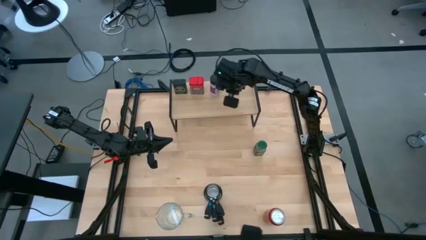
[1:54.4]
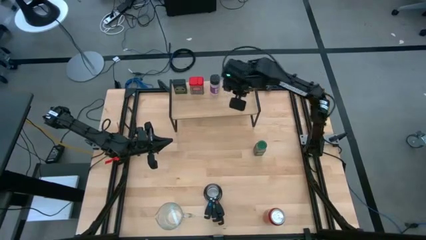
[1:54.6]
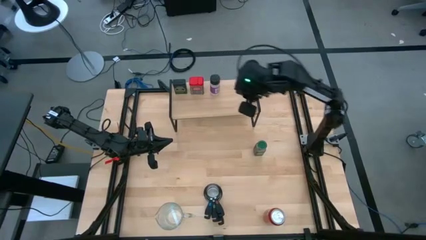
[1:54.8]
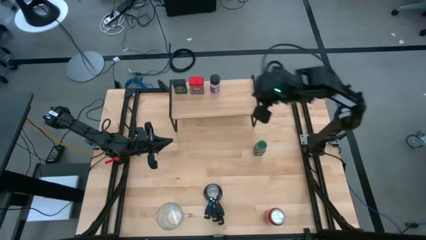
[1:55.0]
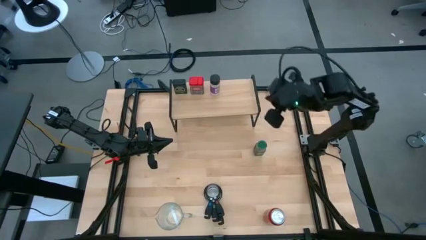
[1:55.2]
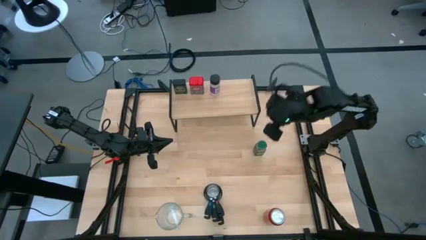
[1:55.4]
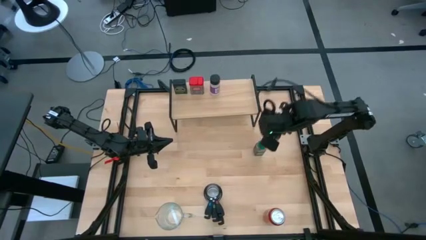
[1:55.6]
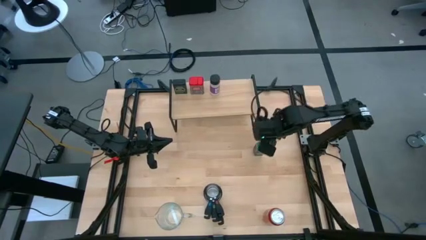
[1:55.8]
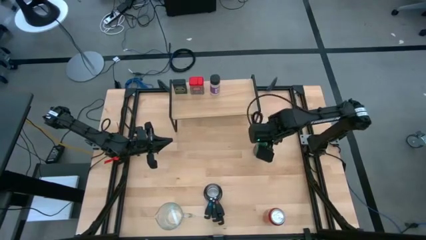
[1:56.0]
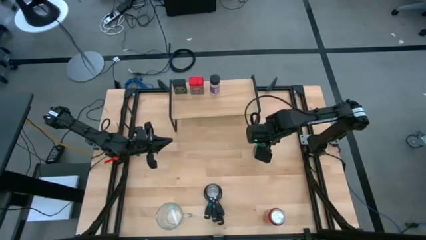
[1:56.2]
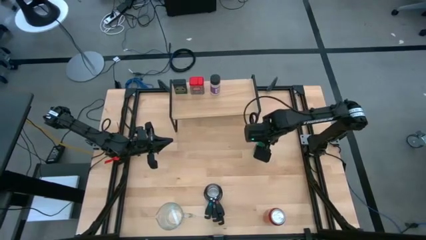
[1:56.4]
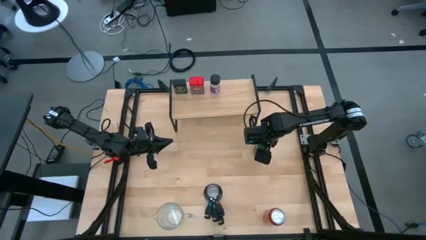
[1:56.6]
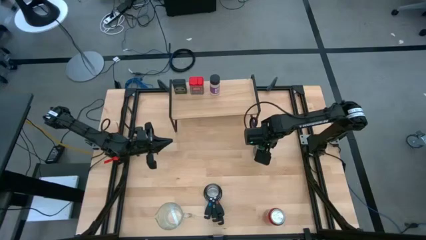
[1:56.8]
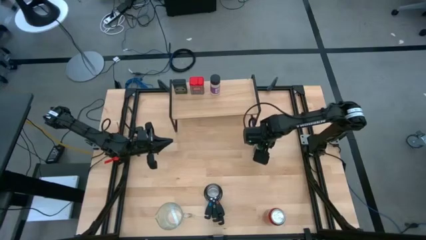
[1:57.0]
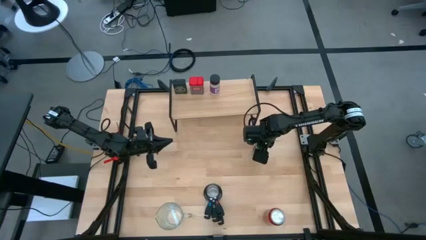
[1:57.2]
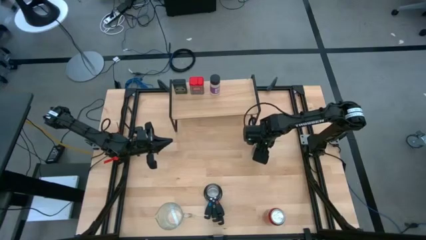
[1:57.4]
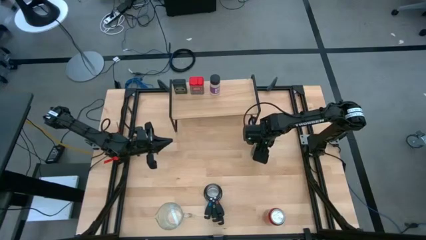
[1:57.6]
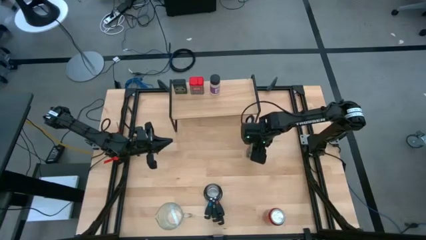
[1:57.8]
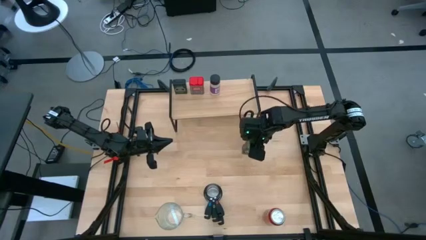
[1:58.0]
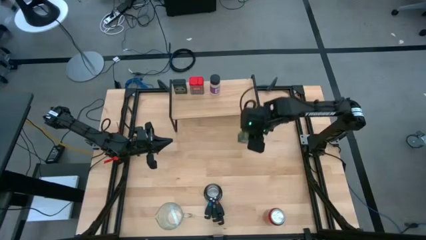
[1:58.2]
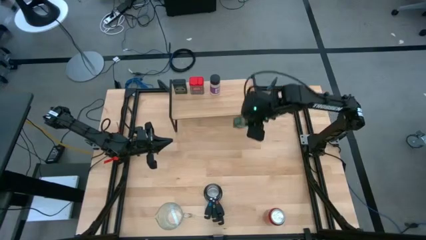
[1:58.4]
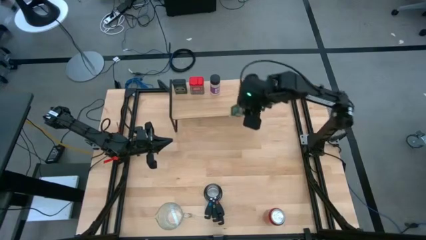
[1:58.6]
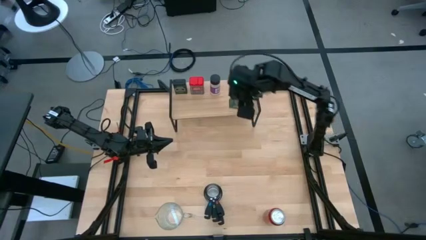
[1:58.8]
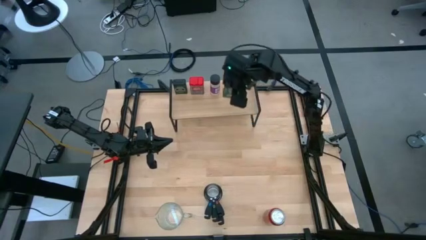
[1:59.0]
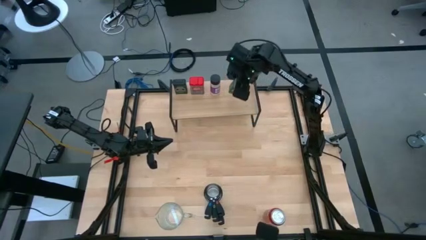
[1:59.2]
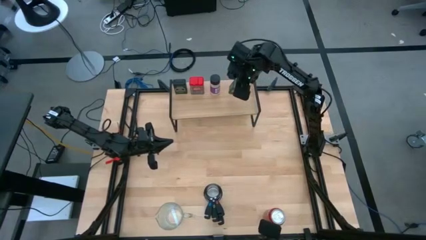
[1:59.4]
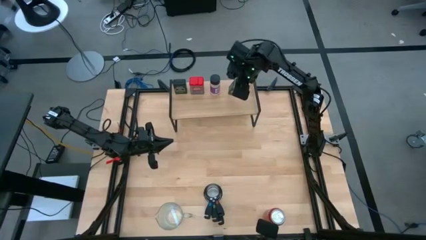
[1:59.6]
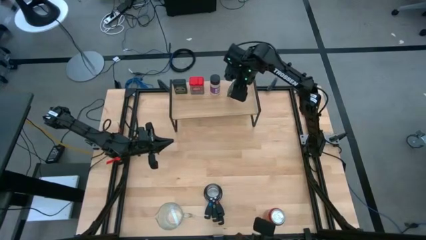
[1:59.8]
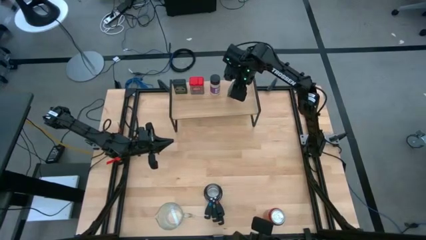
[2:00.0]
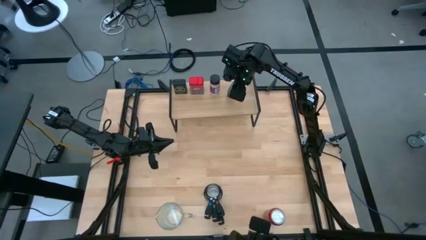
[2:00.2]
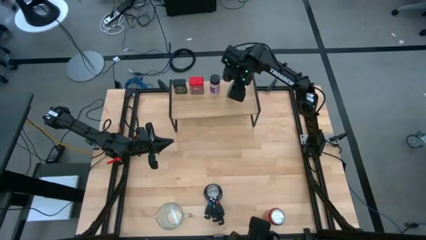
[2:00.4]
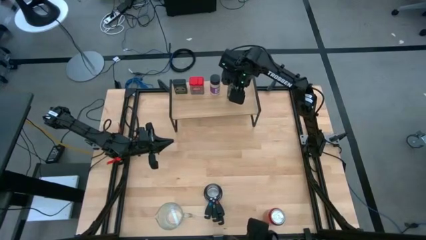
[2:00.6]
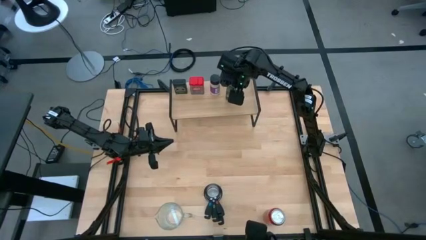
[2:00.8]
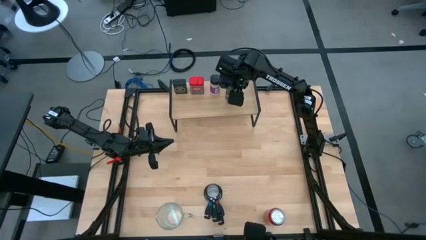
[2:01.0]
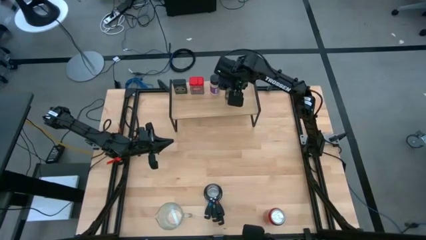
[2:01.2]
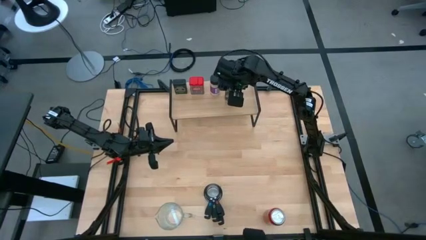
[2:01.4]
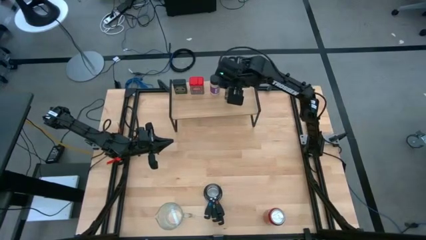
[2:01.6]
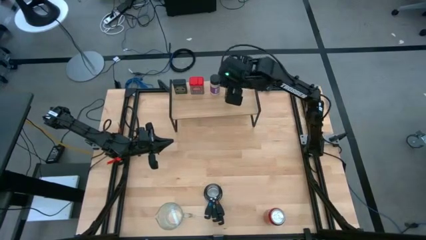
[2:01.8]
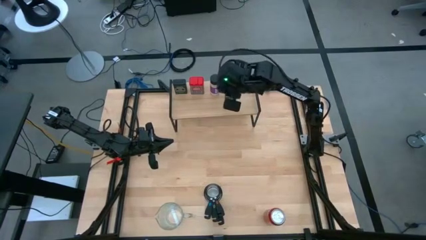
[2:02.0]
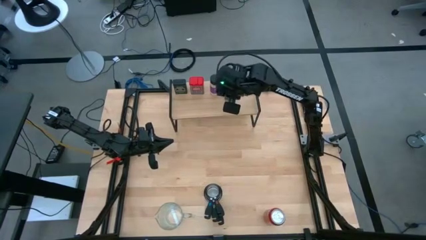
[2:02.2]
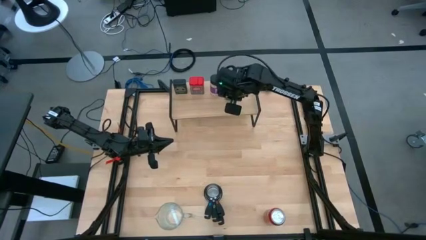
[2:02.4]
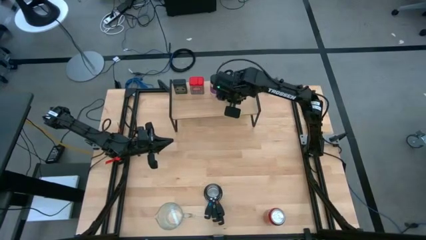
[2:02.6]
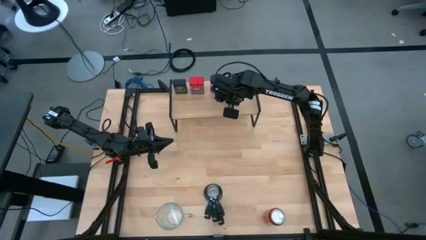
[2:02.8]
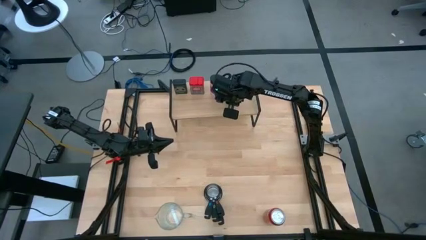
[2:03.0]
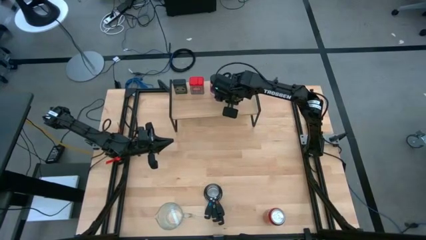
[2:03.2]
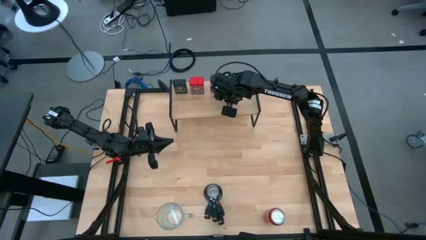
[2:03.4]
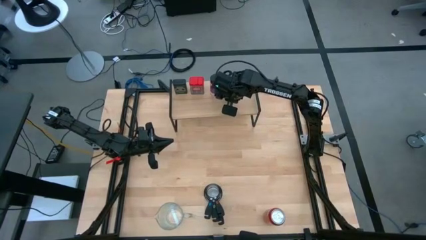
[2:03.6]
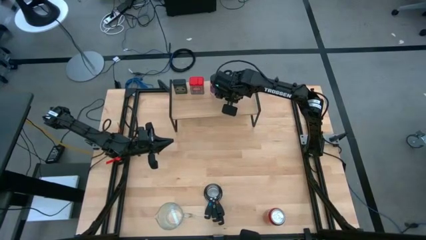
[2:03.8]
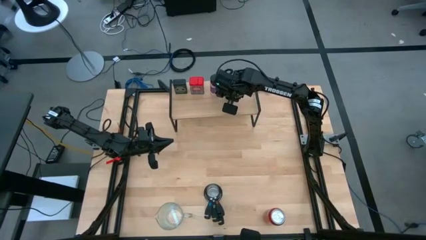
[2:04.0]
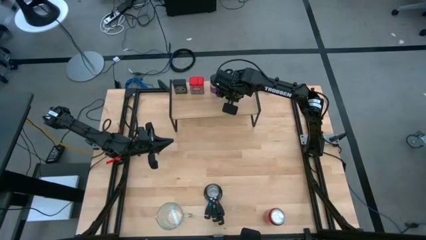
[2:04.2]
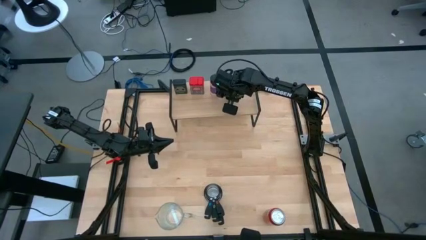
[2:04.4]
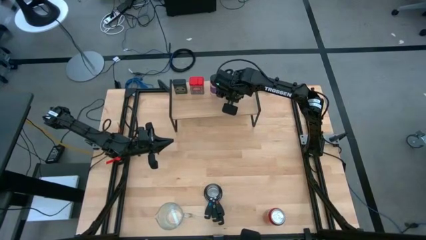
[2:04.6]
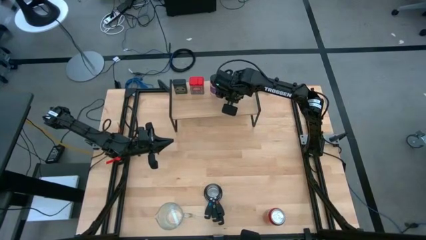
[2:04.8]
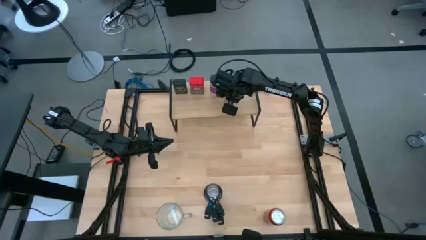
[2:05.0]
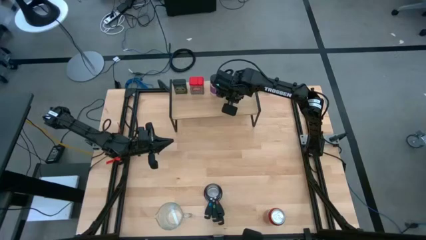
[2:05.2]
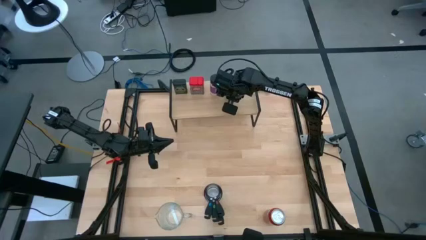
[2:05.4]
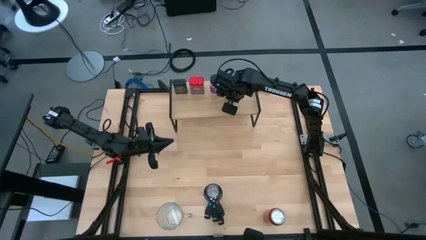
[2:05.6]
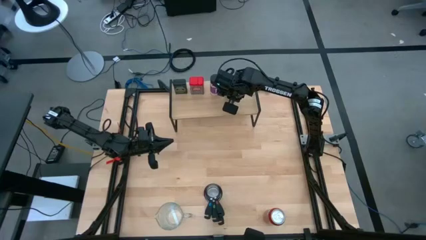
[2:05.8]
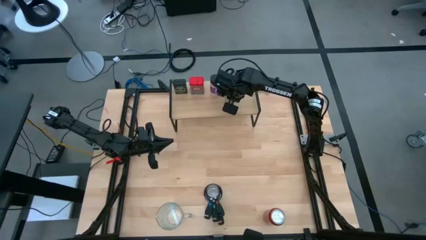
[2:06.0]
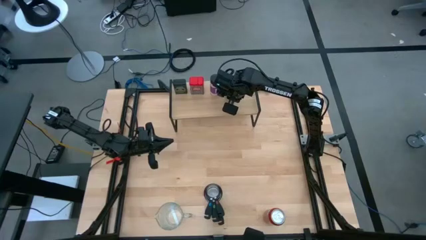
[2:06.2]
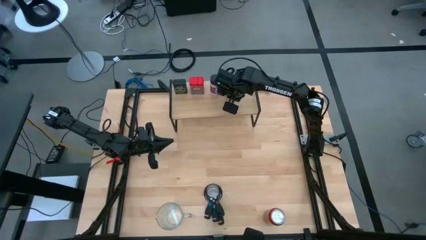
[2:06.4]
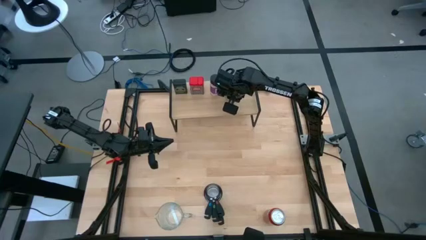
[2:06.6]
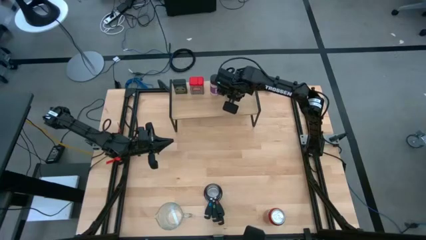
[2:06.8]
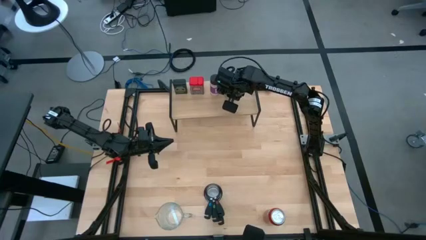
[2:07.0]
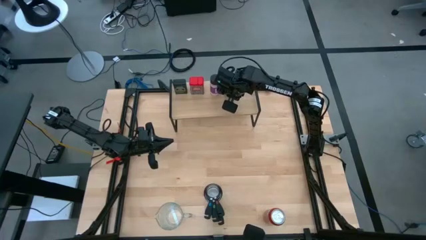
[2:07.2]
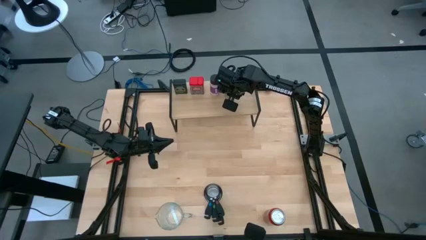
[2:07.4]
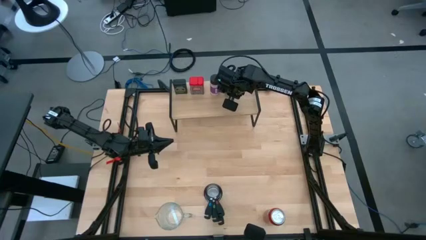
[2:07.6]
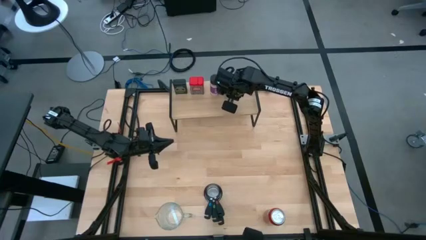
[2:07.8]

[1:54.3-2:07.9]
Task: Shelf spices
Put the green seasoning bottle on the shelf

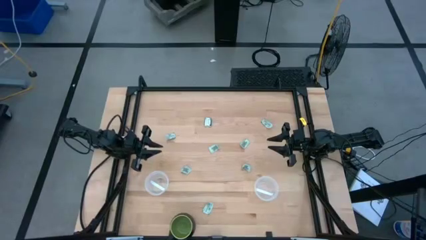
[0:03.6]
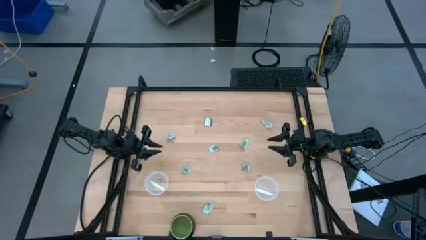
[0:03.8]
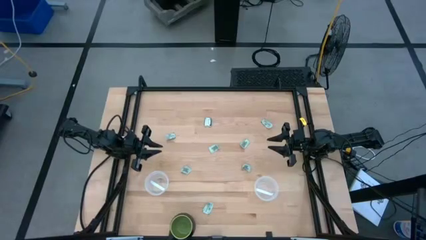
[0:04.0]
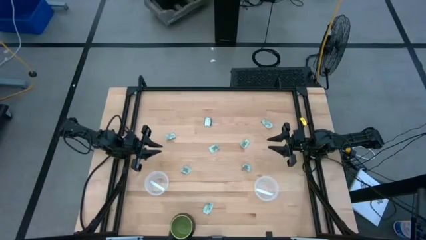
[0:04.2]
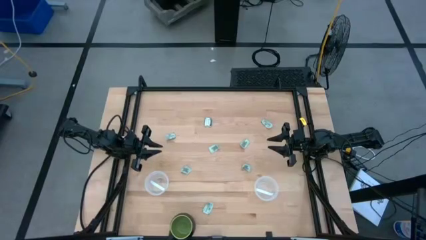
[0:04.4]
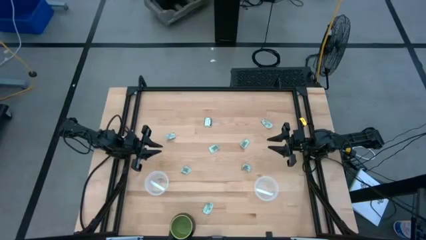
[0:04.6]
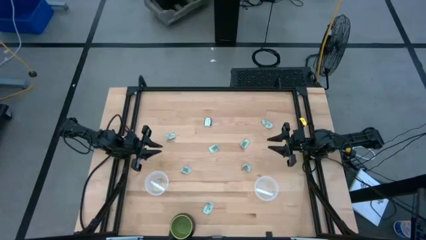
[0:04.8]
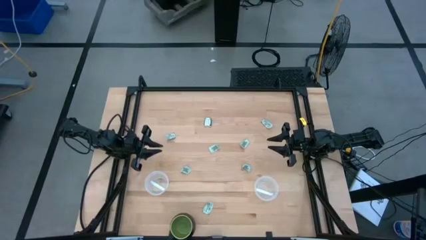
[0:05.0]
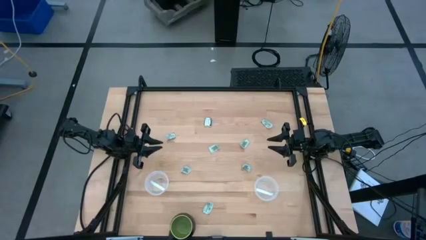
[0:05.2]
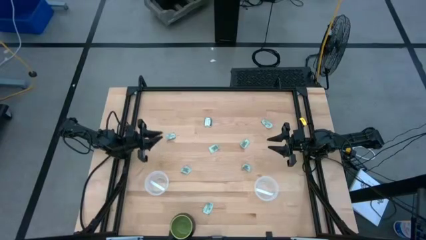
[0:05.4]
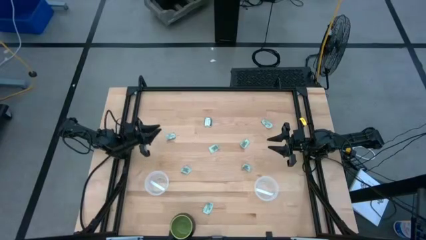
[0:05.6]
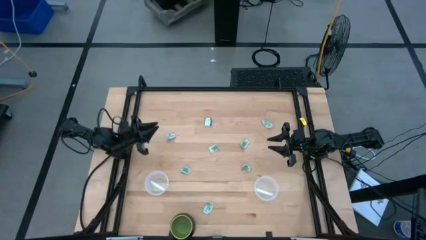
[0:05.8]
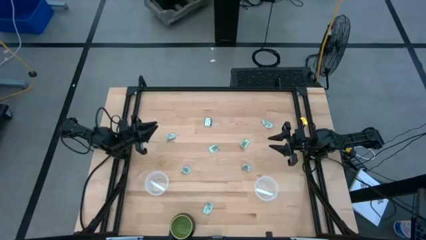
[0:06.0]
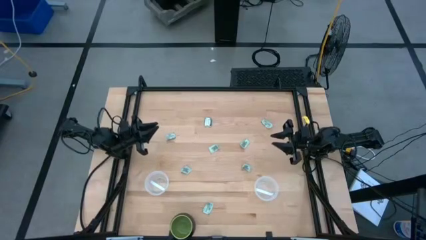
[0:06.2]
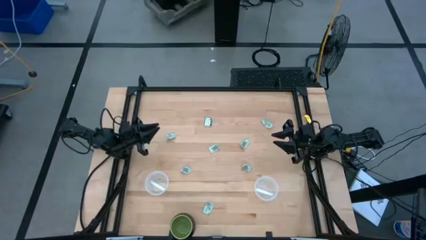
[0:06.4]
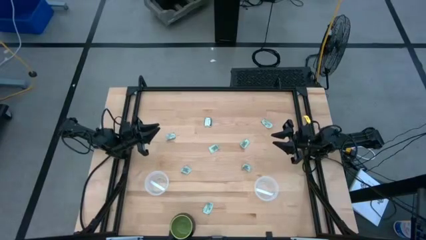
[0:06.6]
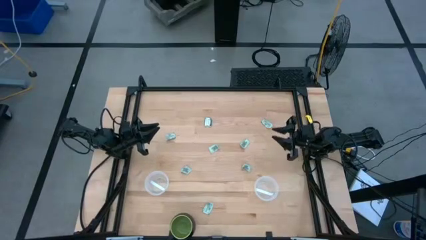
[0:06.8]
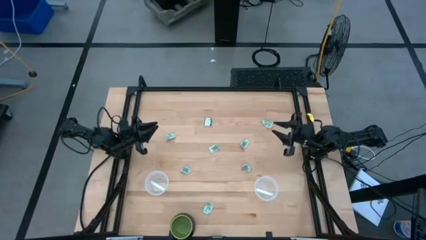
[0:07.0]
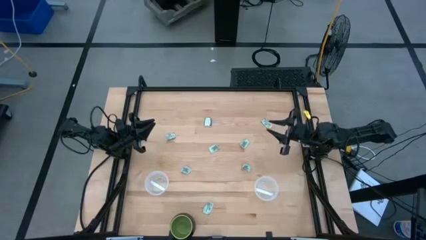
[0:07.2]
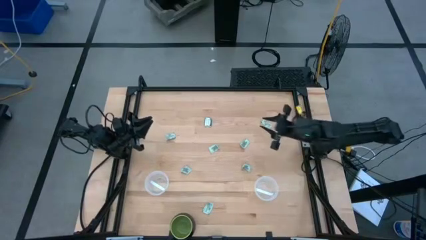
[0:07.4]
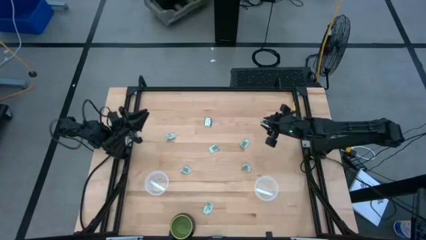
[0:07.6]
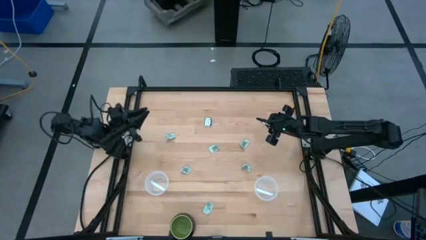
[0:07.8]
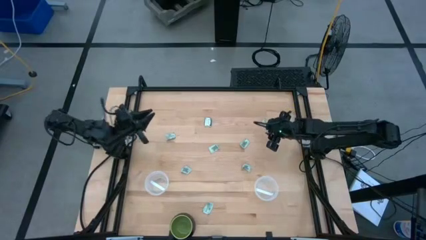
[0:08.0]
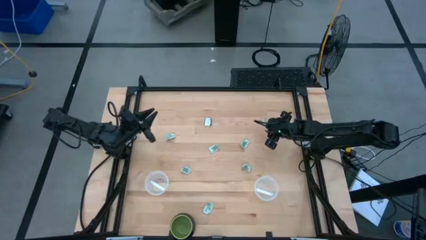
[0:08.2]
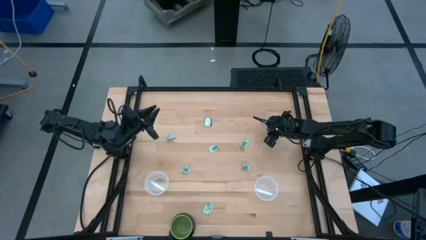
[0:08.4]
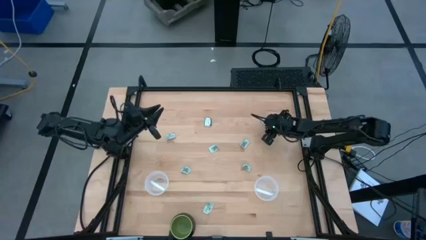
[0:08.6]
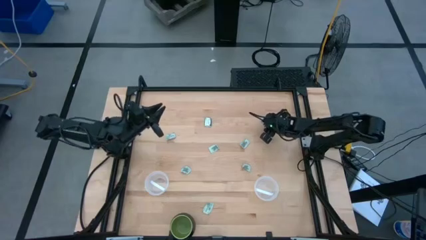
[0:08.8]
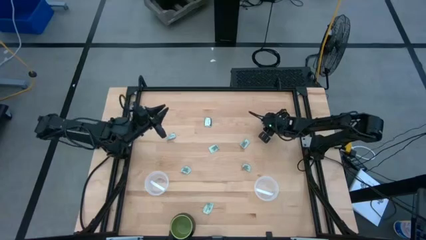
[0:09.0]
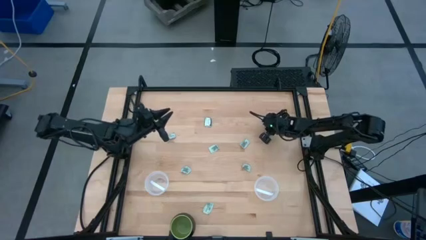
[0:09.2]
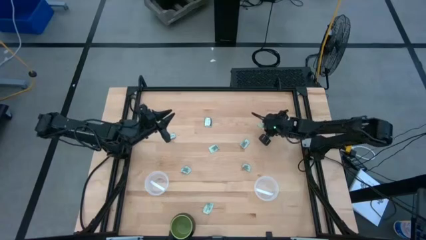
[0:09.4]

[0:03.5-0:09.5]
Task: Pick and place Stevia / Truvia into bins
Put the white stevia packet into the right transparent container
